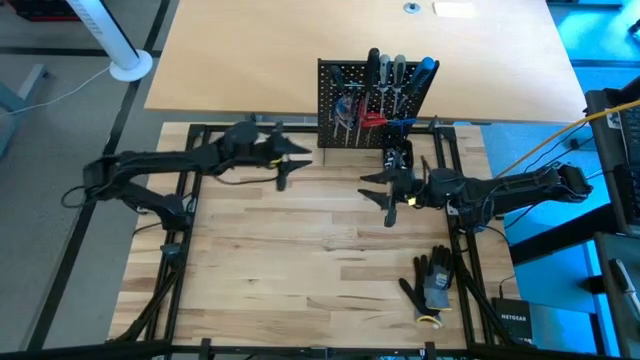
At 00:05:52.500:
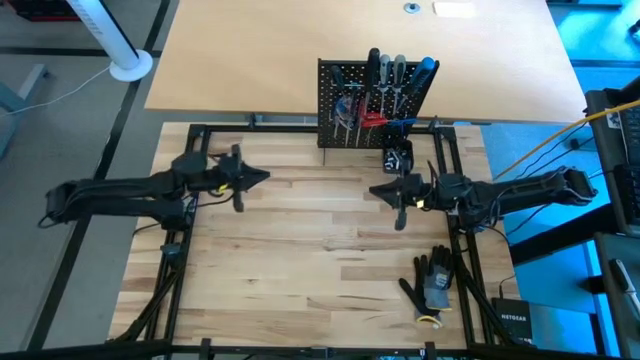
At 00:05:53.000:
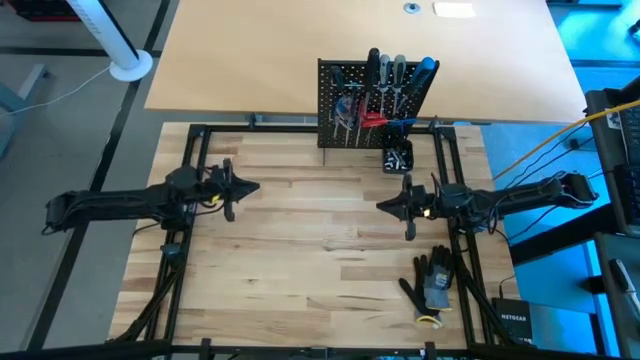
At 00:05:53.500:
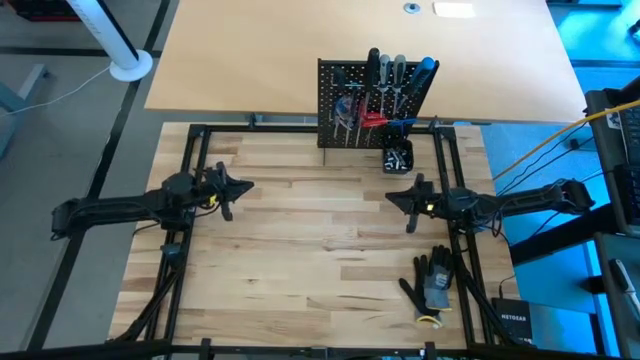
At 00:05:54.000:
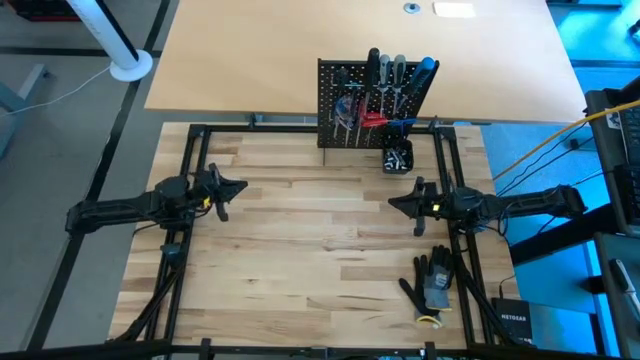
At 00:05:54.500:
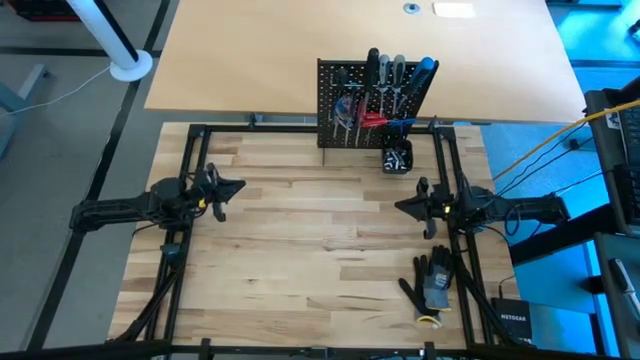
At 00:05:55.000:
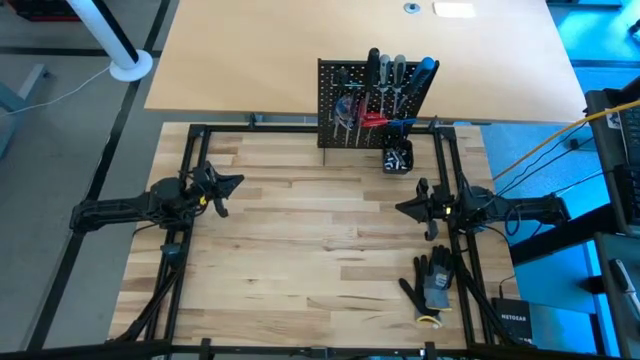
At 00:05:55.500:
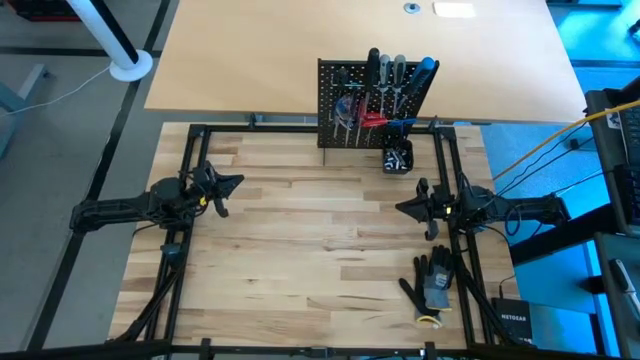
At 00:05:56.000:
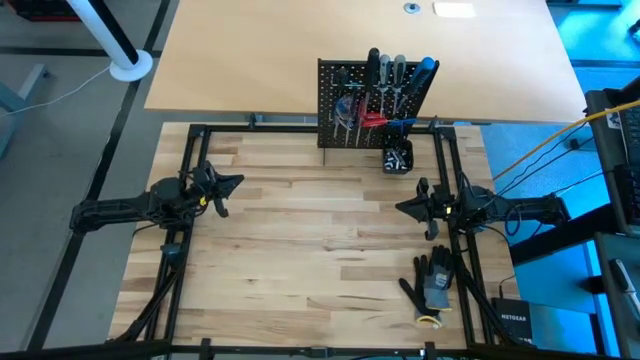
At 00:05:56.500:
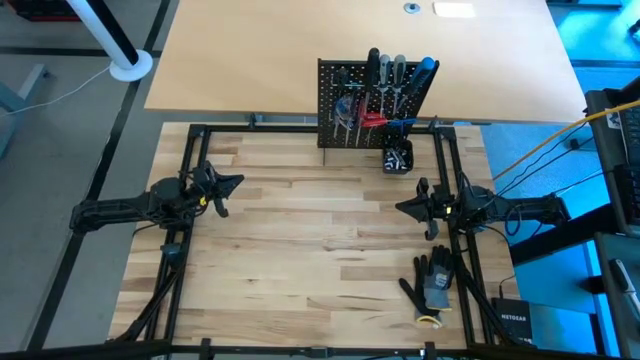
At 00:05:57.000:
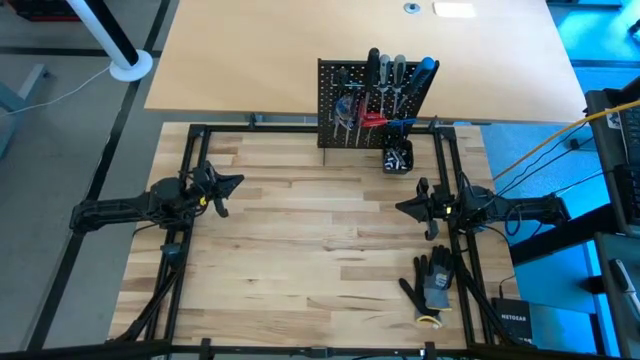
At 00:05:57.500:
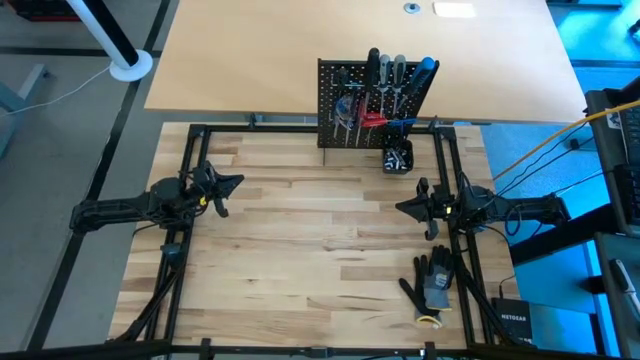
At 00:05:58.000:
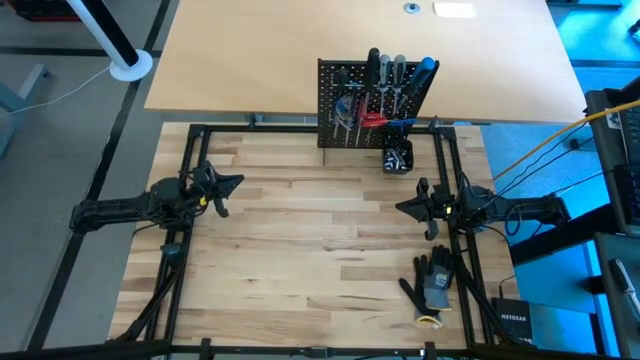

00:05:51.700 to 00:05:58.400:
Task: Hang tools onto peg board
Return to Home Position

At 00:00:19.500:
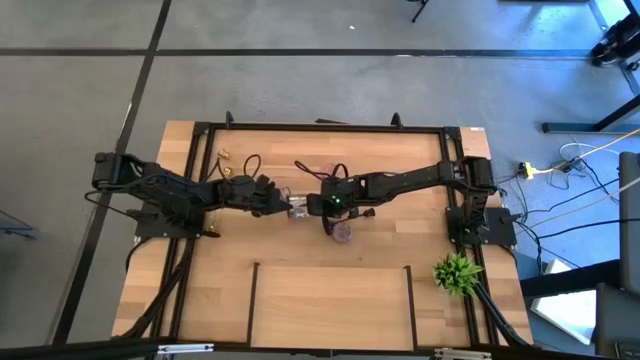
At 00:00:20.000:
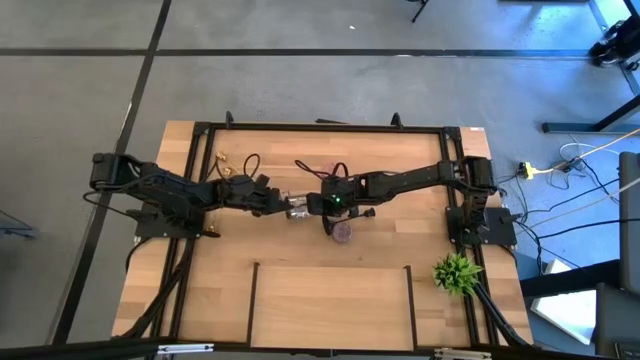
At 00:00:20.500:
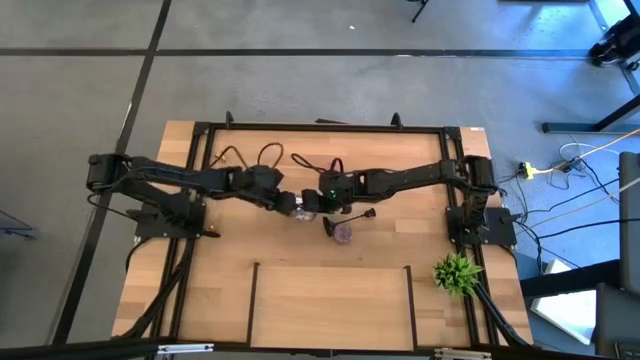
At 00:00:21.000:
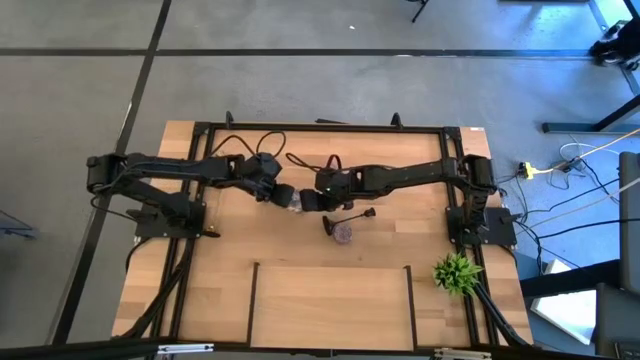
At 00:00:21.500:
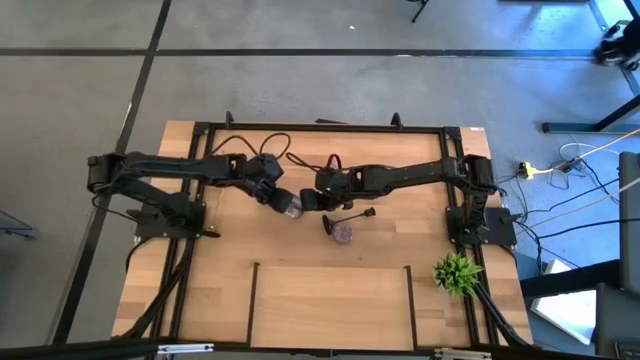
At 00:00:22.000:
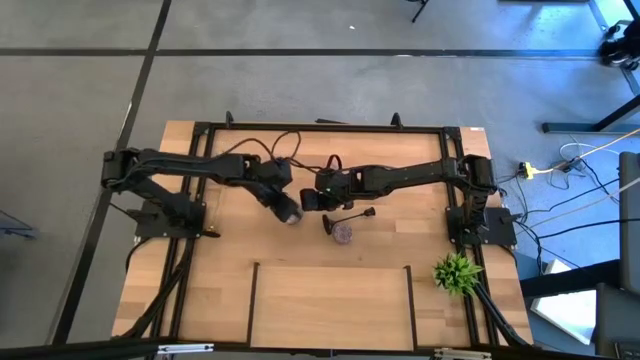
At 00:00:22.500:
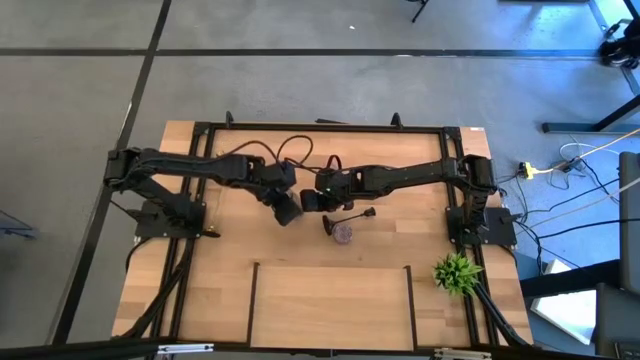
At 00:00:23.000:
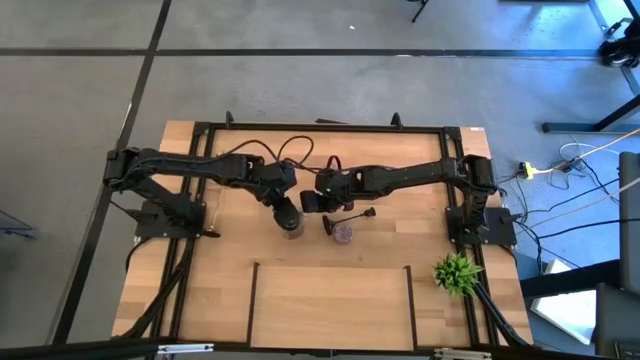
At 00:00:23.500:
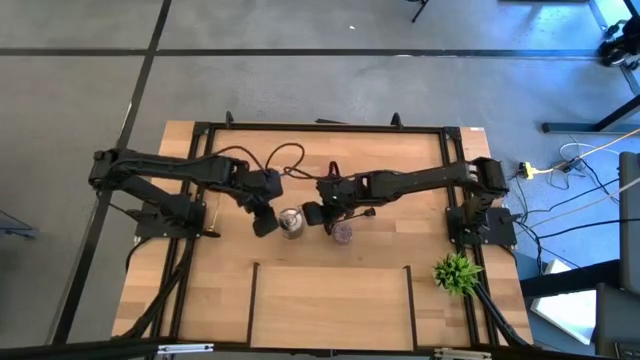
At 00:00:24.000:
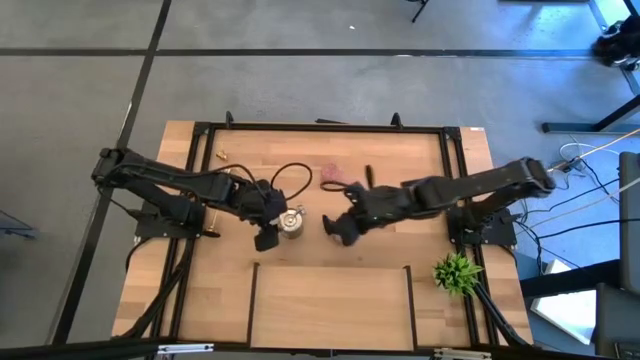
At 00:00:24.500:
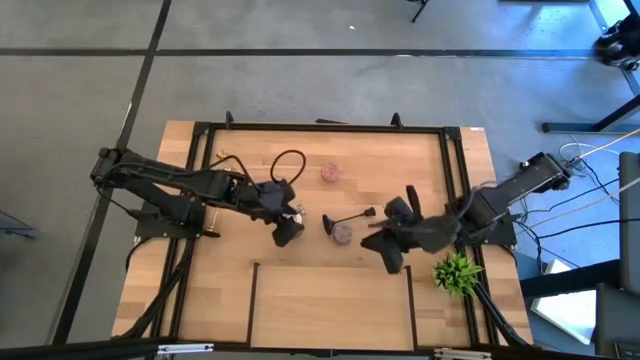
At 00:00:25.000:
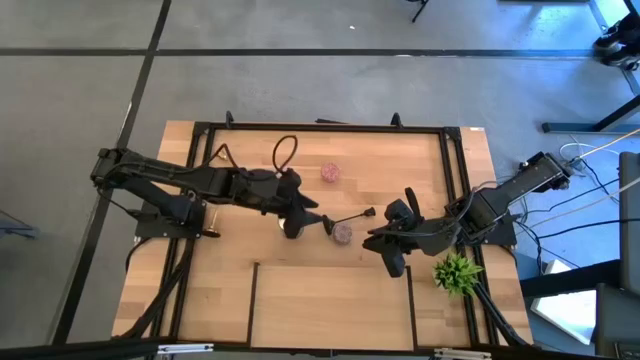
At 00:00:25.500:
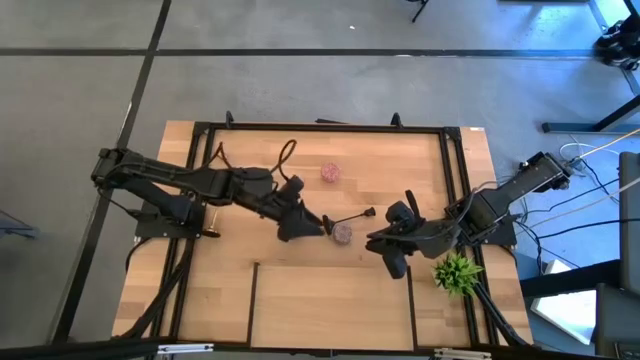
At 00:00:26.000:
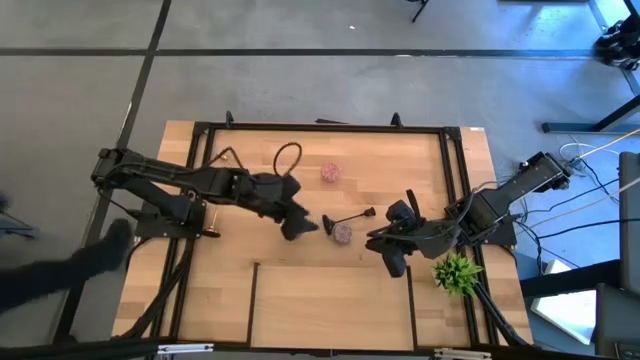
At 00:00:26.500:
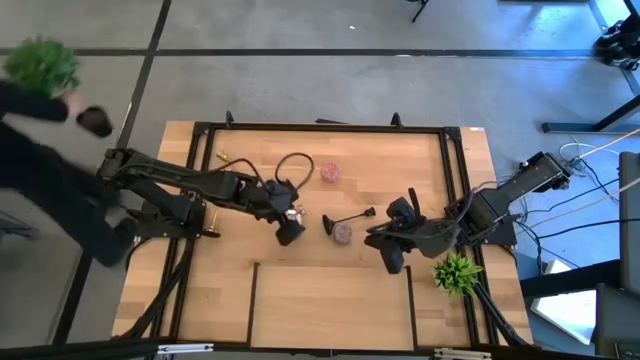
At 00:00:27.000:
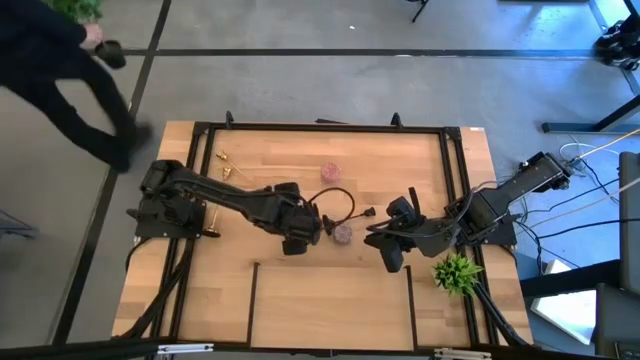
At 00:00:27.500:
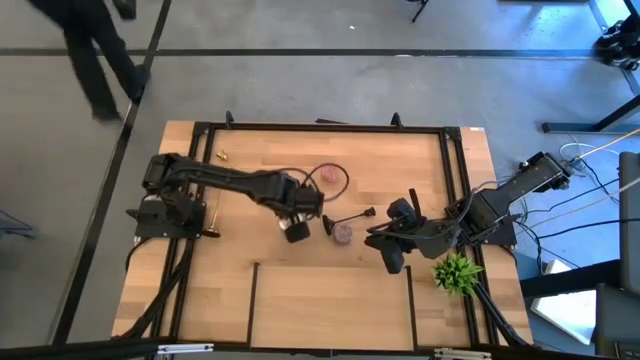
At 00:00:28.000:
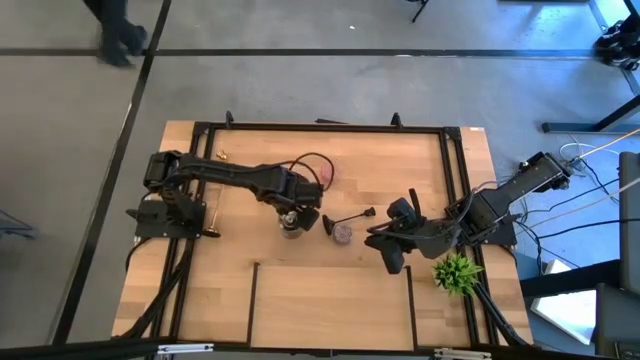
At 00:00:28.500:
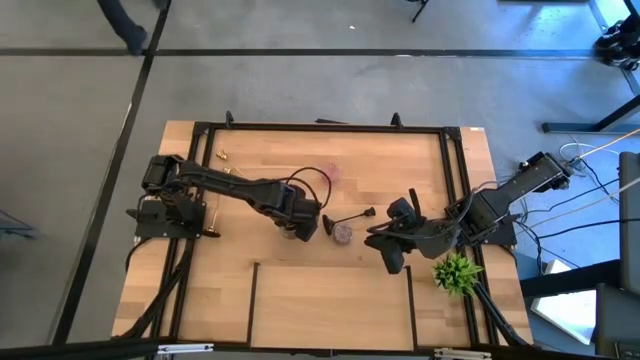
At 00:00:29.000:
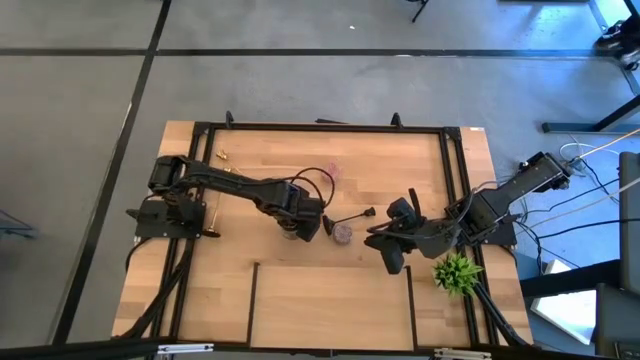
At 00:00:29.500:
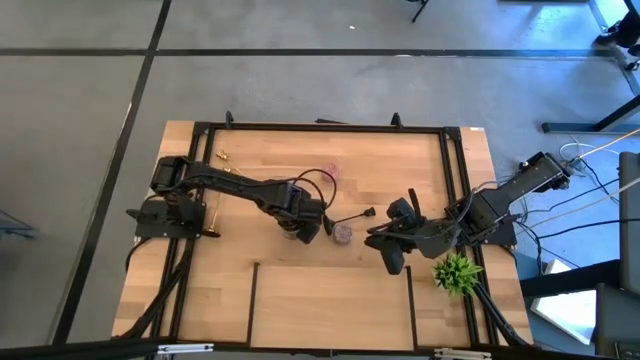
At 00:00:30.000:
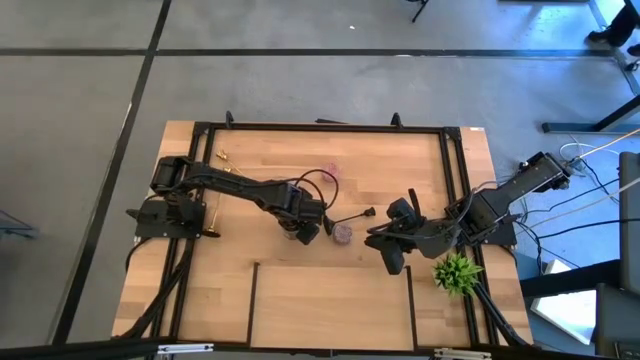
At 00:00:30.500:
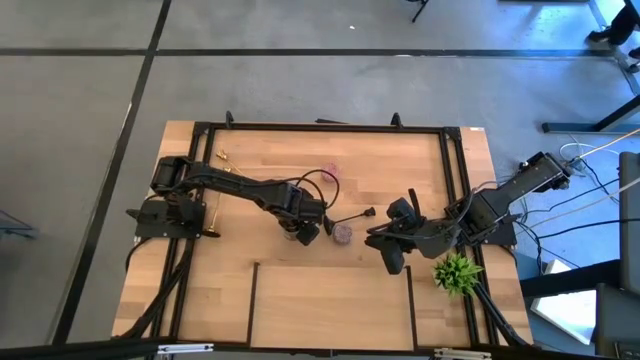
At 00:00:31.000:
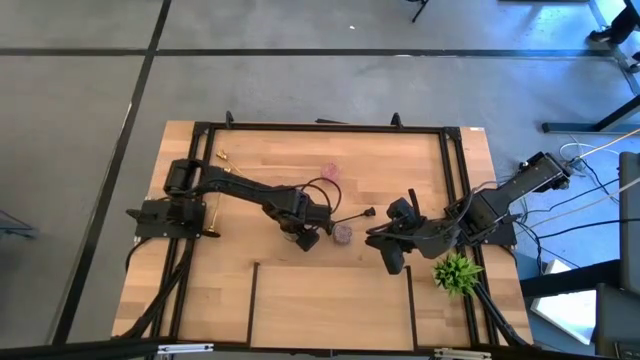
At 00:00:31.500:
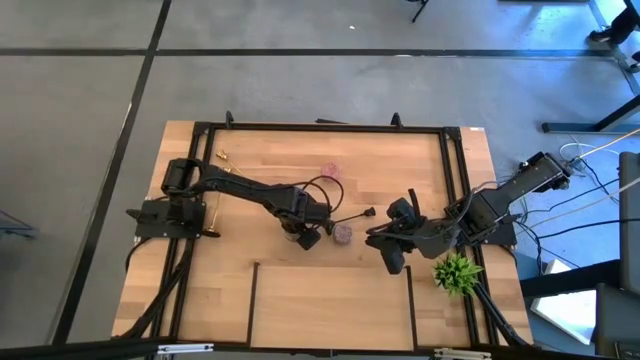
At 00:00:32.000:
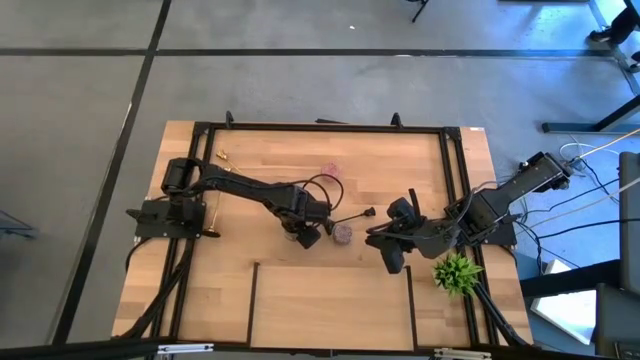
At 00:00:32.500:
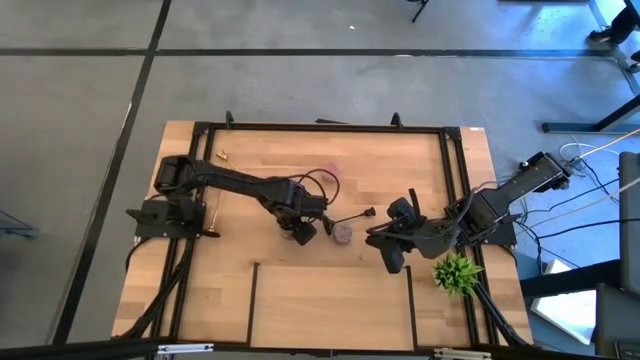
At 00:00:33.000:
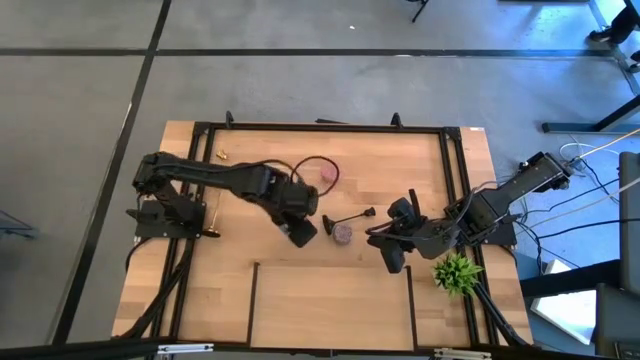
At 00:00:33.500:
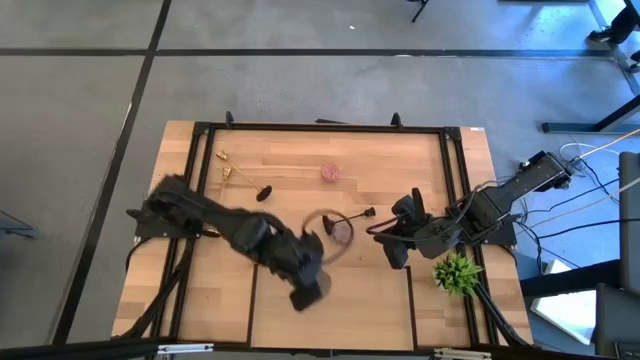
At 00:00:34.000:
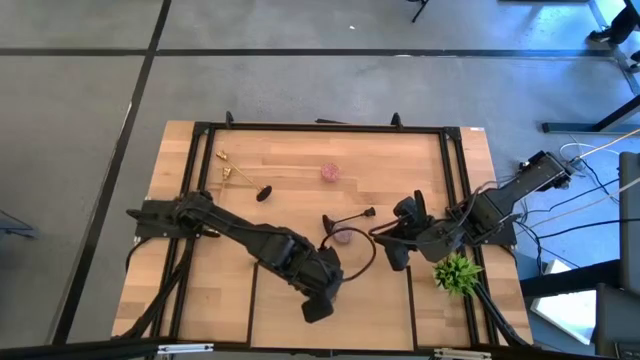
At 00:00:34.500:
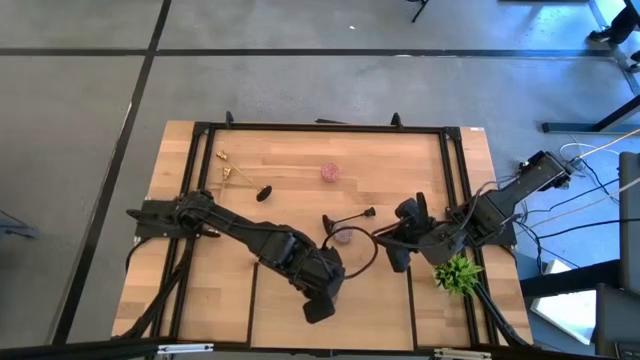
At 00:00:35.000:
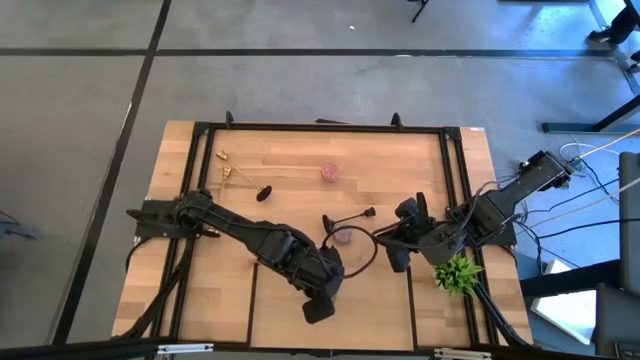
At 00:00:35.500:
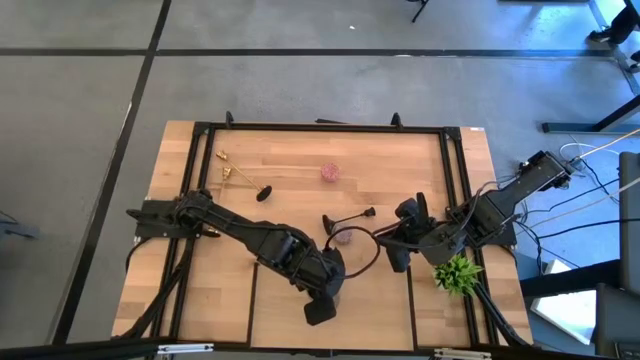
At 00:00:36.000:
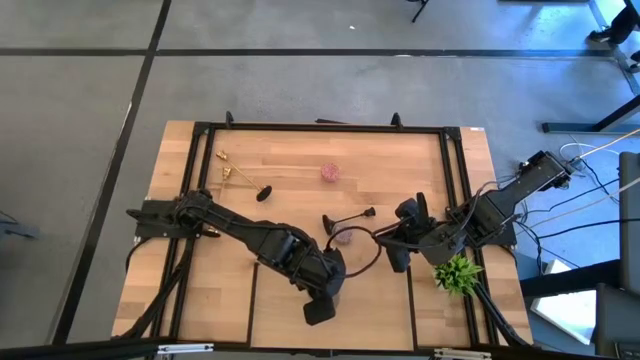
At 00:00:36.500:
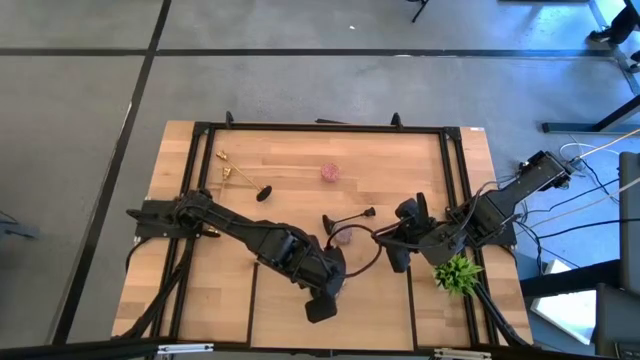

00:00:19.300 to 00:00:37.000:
Task: Pick & Place candle stick holders
Put the silver scented candle on the shelf
